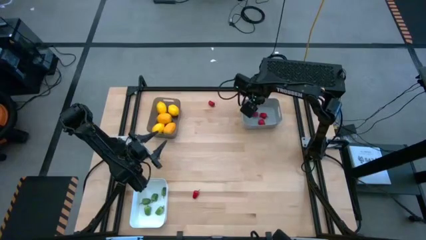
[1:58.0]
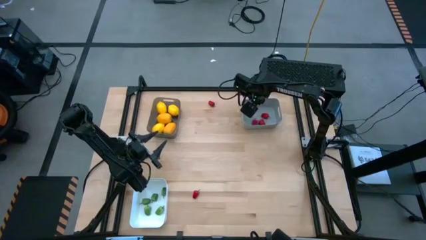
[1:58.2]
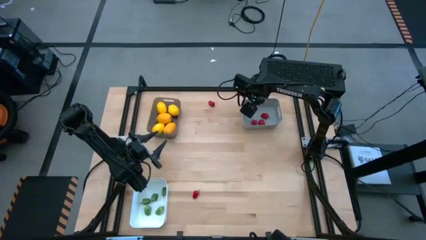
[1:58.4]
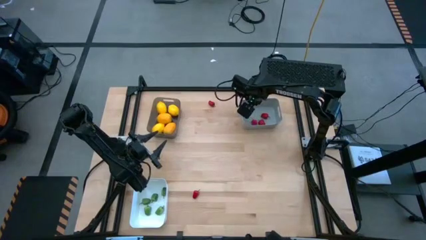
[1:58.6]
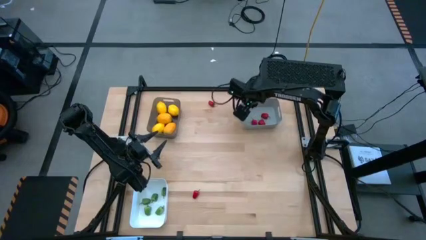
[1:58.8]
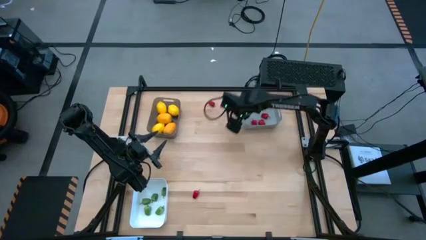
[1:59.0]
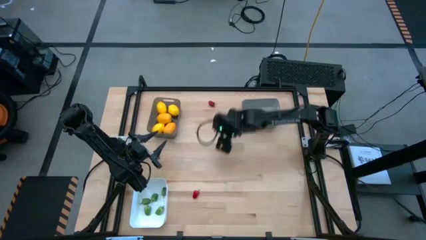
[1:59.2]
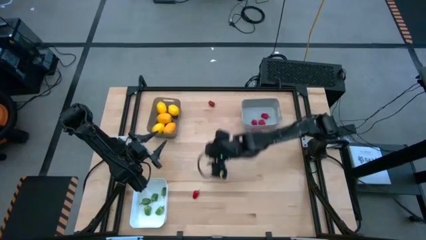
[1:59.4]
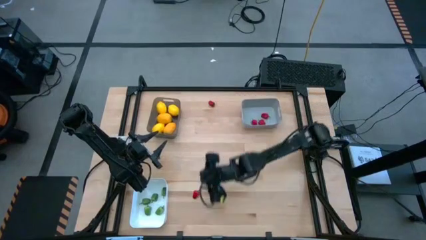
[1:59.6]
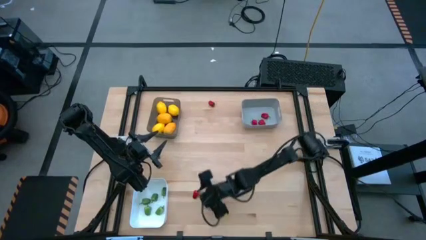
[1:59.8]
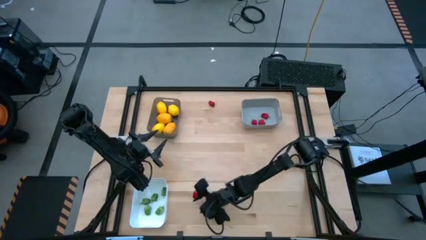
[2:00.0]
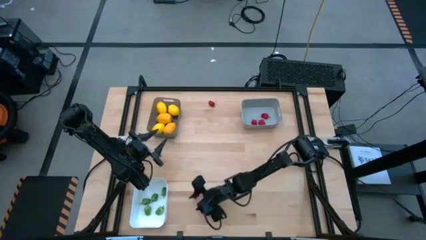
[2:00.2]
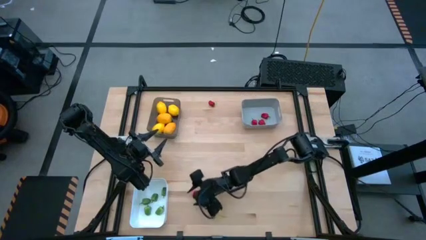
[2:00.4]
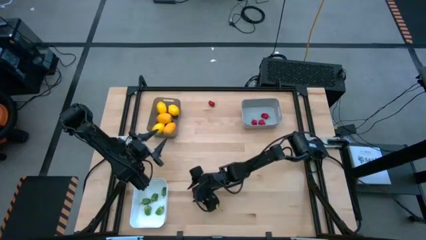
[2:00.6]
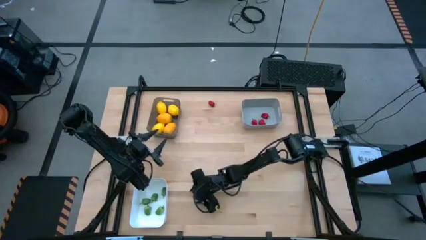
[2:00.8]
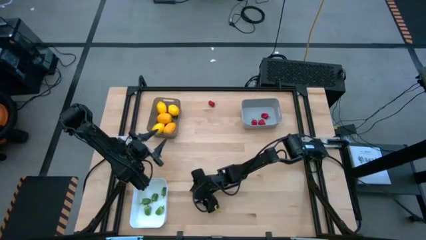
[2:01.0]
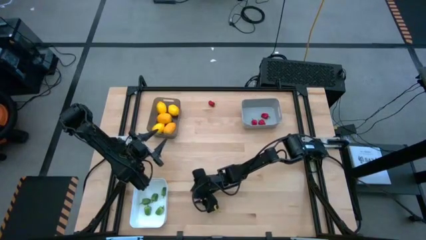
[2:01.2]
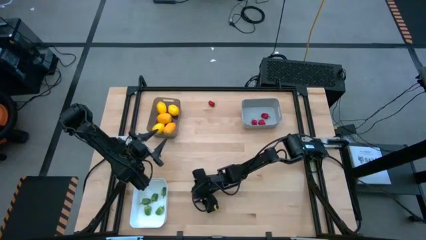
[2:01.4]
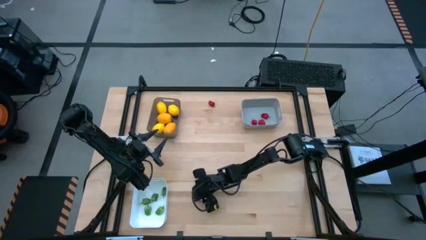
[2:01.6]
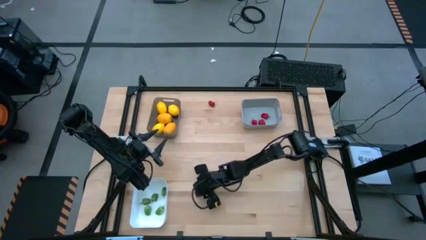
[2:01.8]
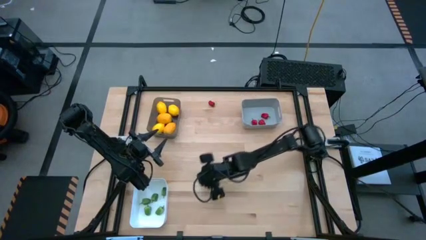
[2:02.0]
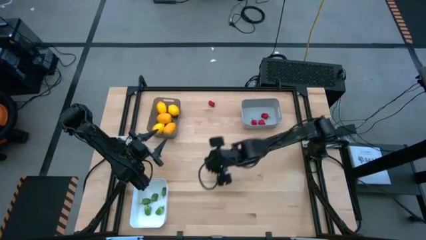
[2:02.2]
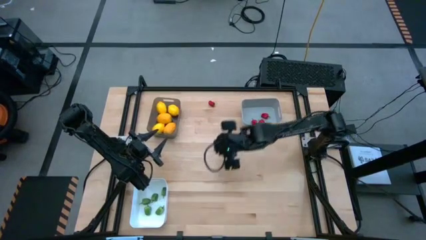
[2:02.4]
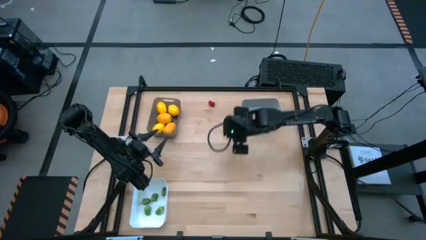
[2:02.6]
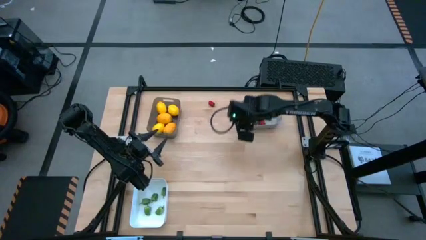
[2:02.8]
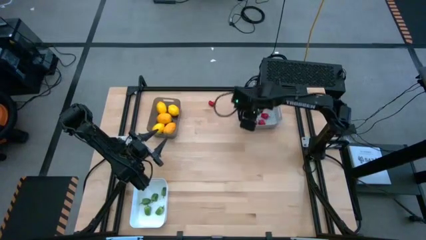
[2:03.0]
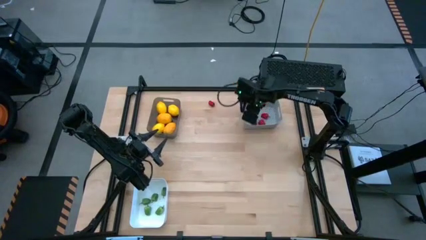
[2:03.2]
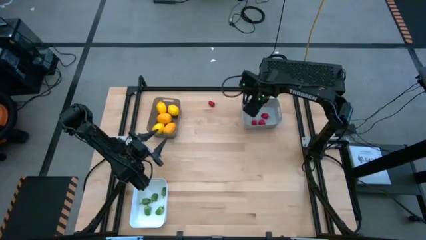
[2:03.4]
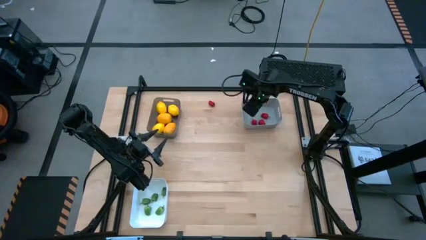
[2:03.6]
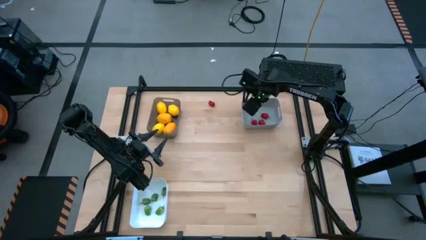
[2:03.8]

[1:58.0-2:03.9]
Task: Sort produce into baskets
Put the red bell pepper into the gray bin

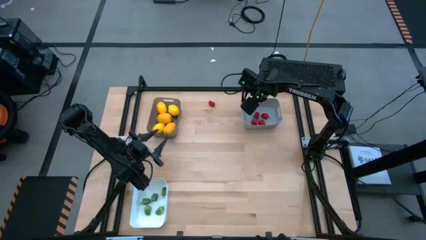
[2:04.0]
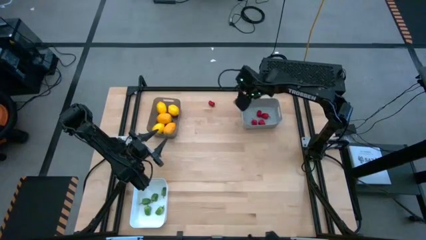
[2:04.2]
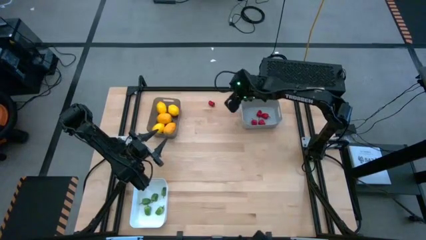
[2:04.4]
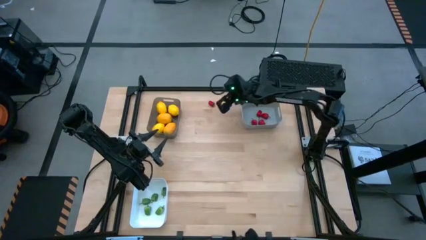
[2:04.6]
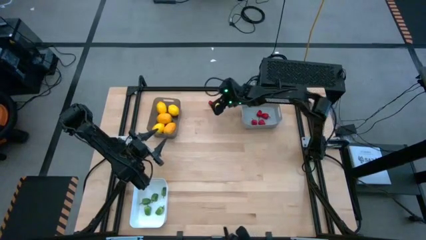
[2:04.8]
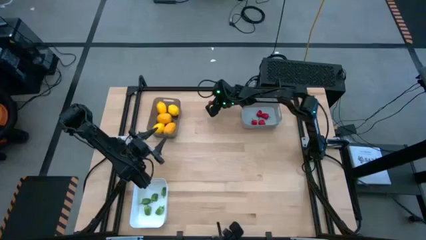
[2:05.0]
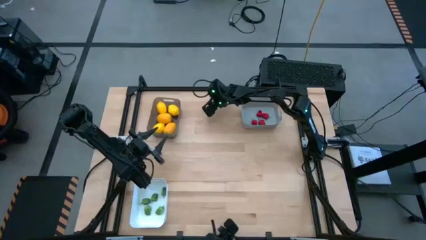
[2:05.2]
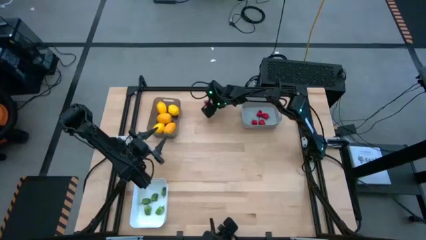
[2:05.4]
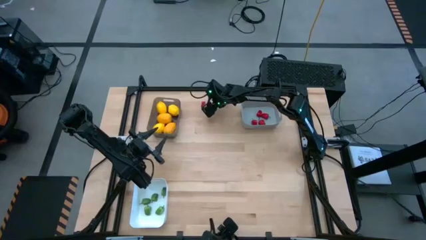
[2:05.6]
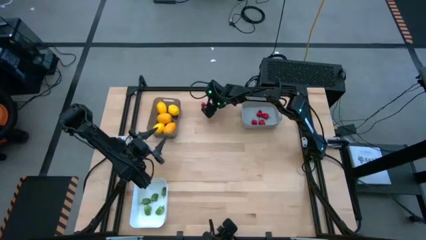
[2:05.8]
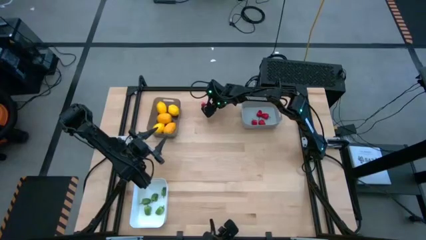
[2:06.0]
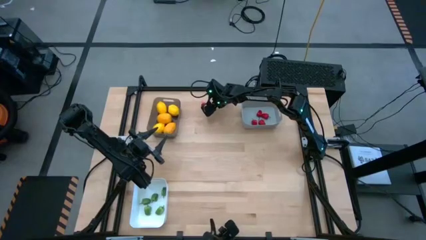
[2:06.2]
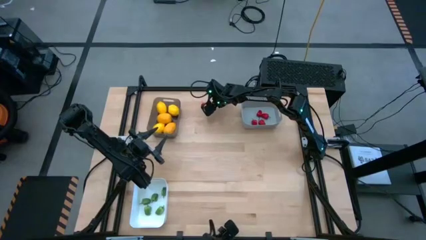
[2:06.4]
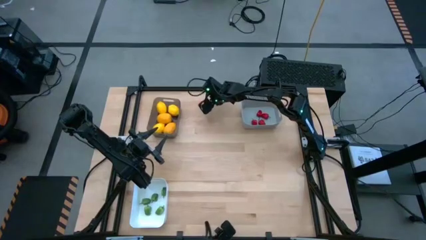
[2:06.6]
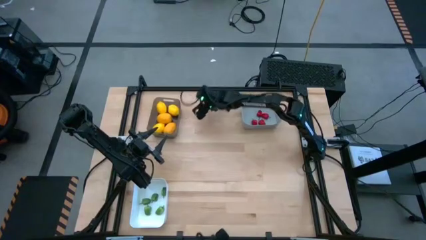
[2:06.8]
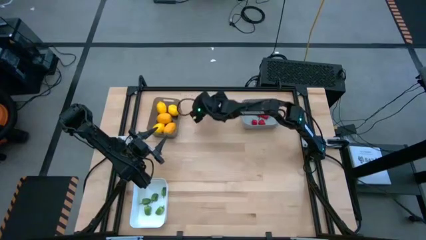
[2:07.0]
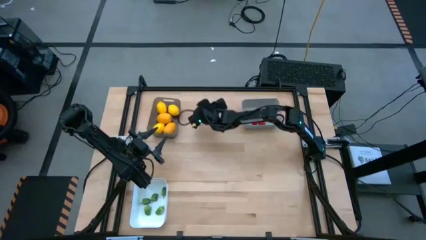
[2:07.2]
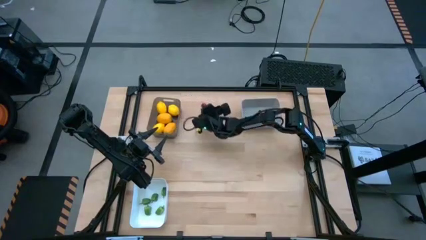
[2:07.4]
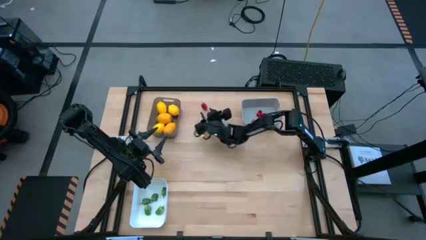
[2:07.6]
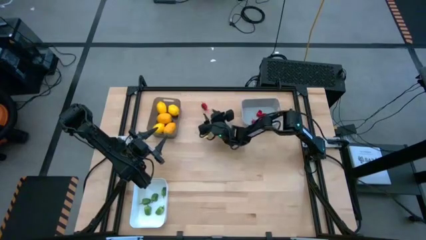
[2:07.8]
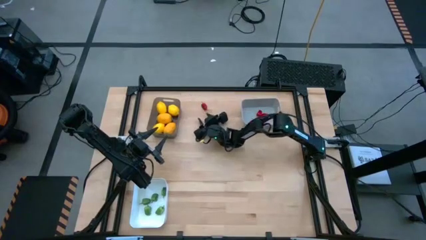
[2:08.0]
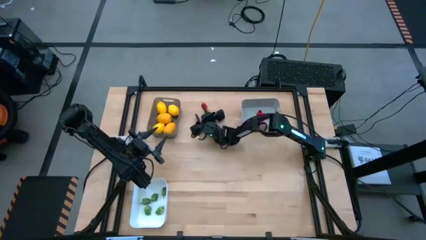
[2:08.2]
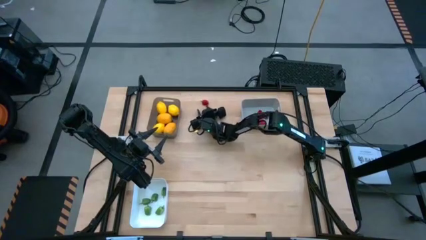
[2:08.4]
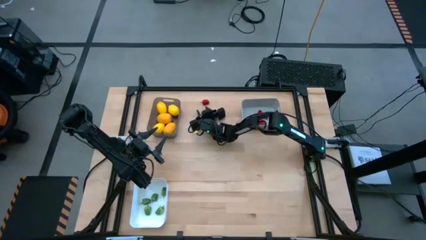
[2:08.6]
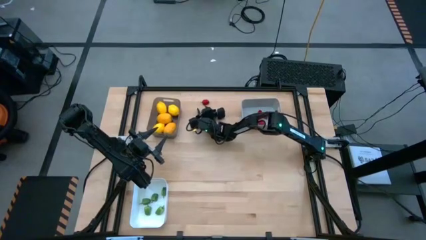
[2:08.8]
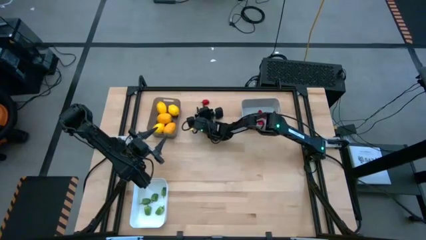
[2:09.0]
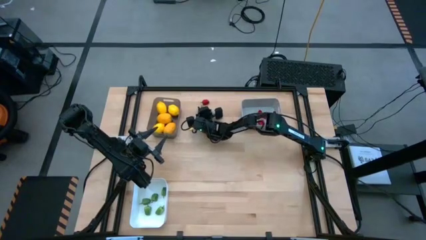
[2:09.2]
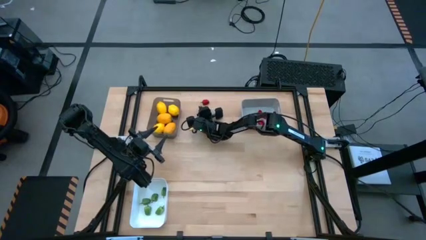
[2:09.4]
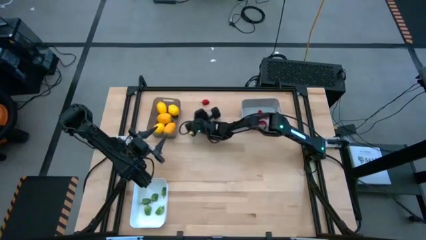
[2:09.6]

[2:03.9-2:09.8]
Put the red bell pepper into the gray bin

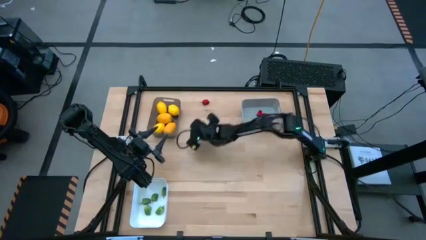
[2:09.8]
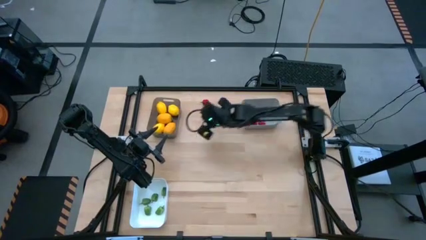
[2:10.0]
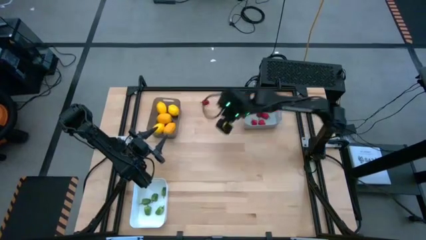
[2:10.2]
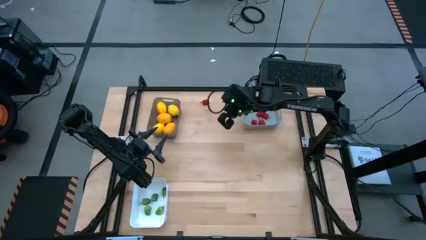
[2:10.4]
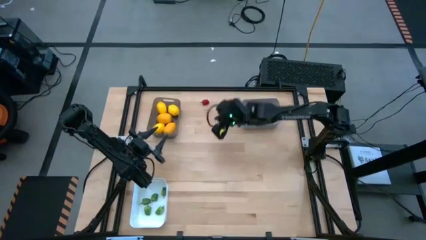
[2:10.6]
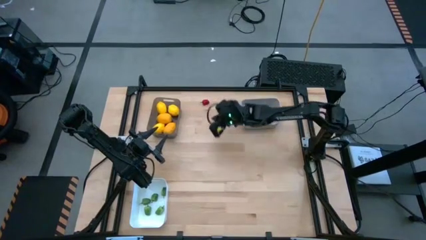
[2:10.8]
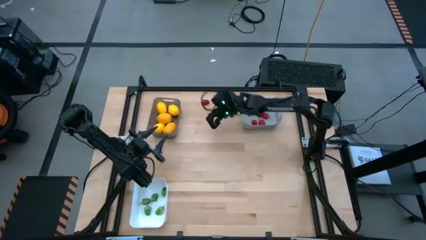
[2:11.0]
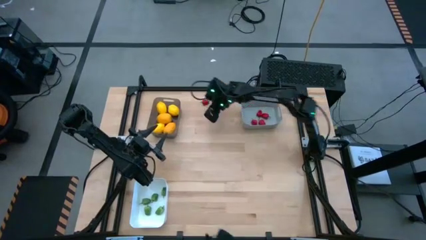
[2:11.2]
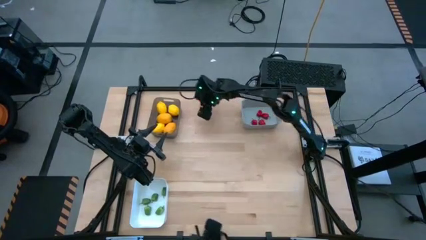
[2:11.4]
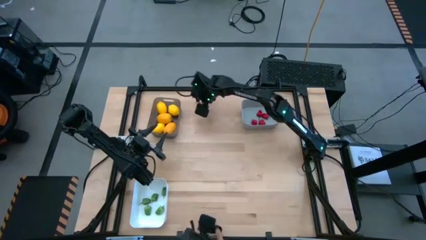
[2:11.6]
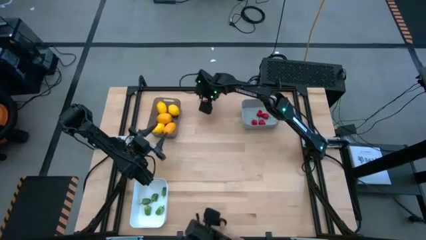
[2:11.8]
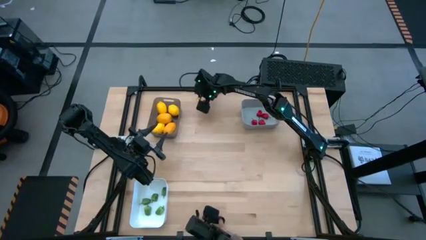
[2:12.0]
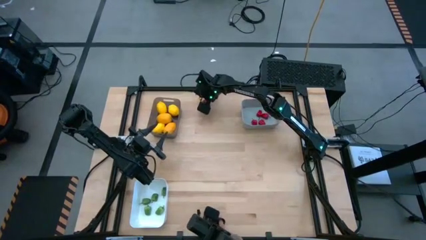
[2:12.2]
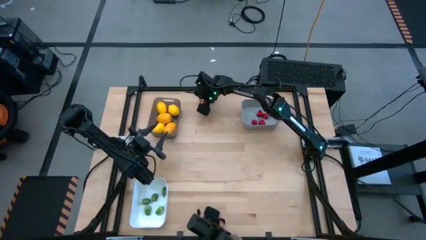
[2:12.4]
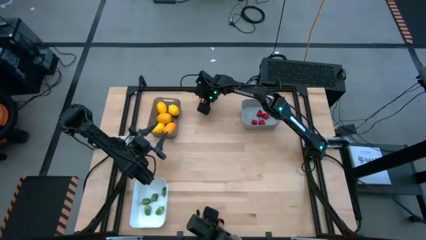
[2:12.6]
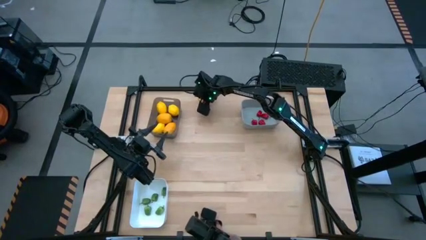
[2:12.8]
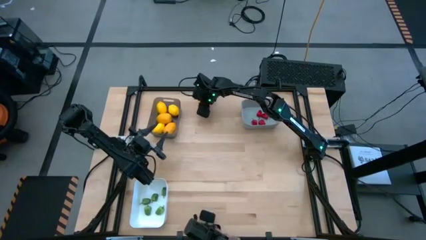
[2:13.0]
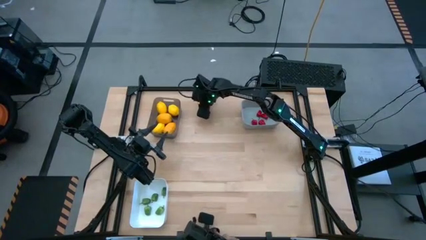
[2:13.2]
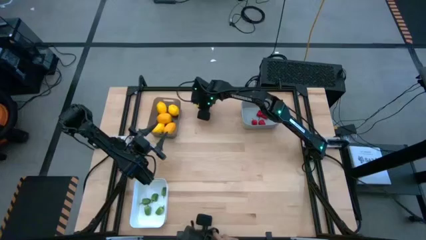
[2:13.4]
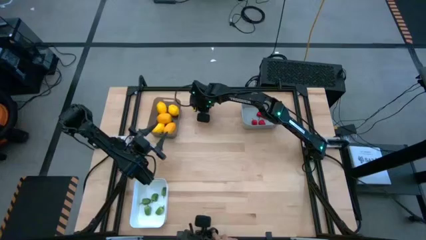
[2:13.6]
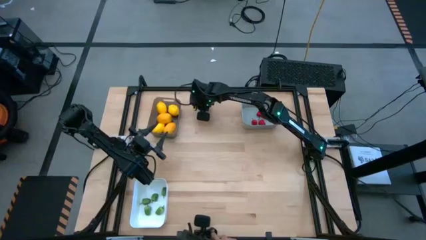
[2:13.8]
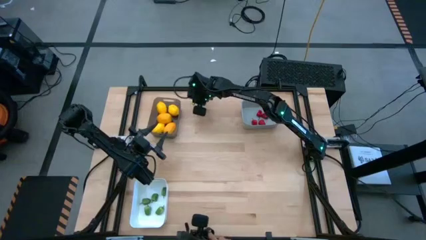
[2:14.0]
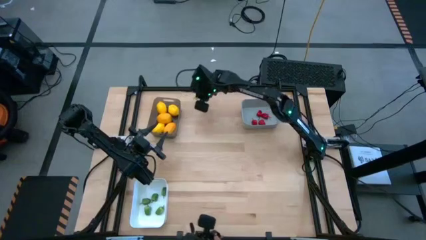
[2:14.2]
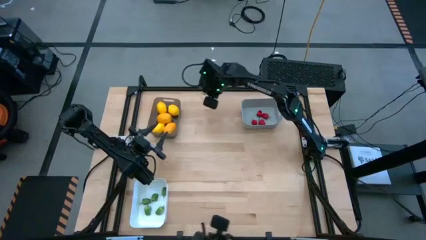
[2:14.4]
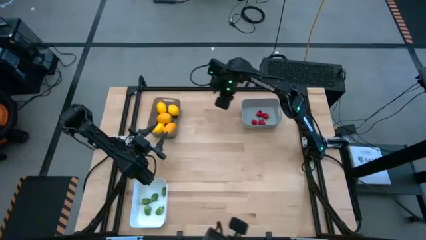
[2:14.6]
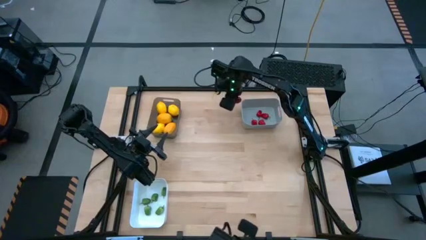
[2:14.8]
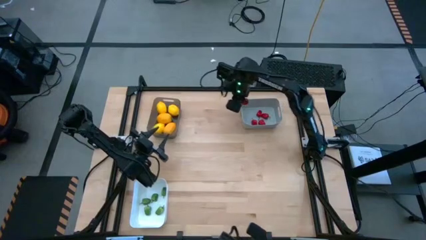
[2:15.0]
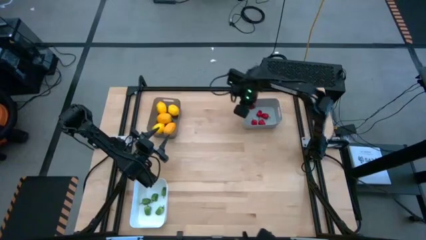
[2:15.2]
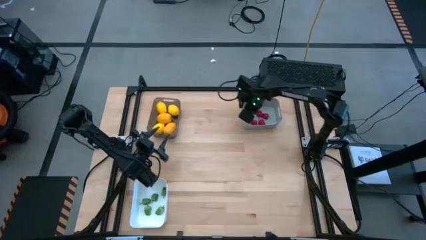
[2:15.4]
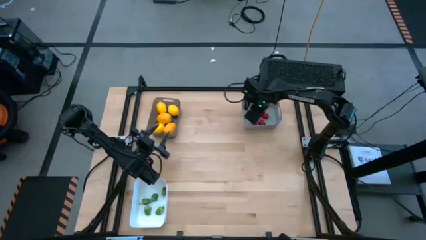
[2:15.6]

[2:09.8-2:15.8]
Put the red bell pepper into the gray bin
